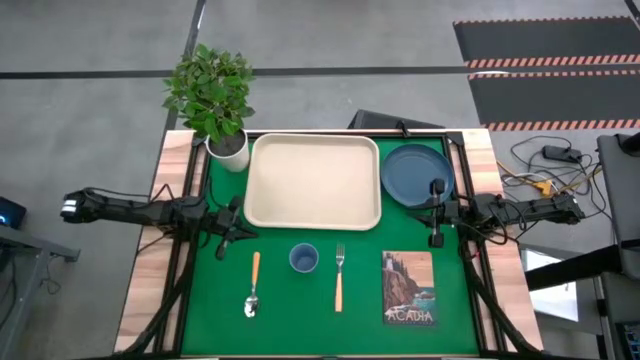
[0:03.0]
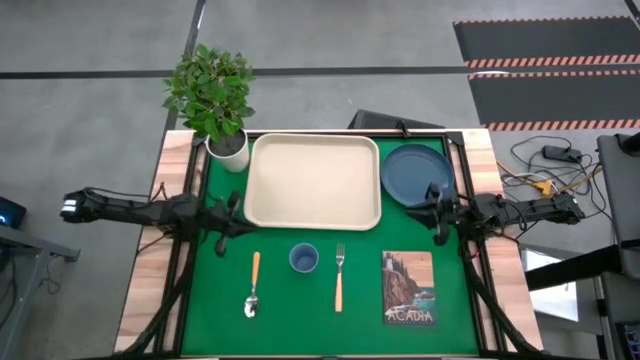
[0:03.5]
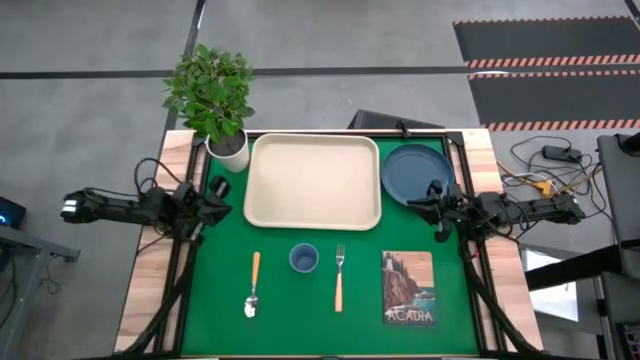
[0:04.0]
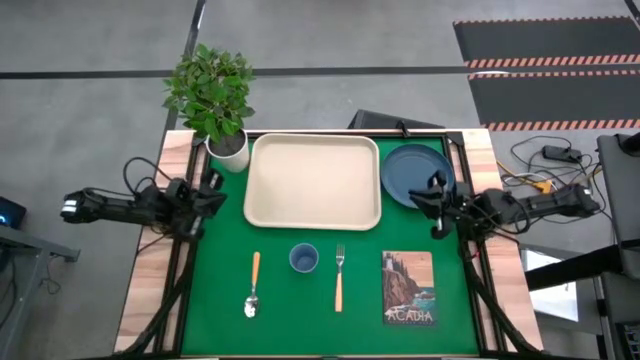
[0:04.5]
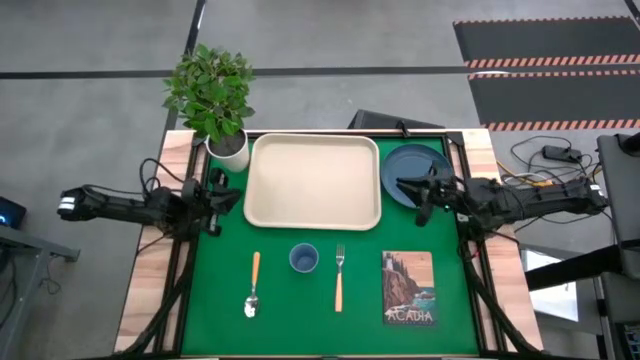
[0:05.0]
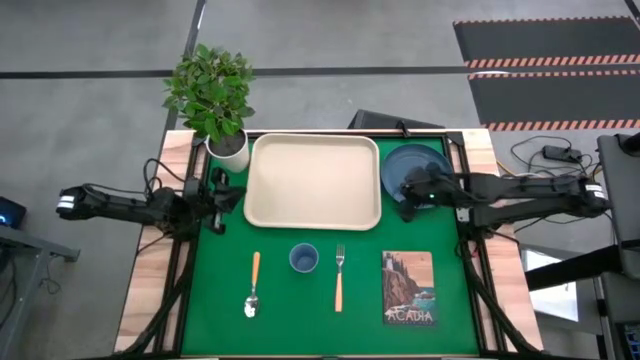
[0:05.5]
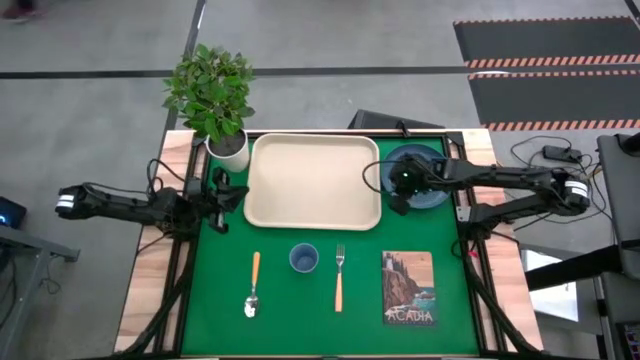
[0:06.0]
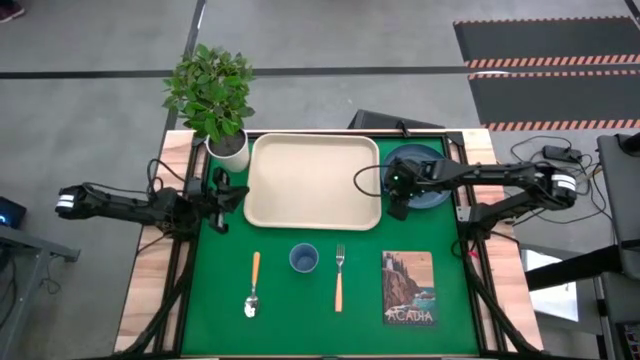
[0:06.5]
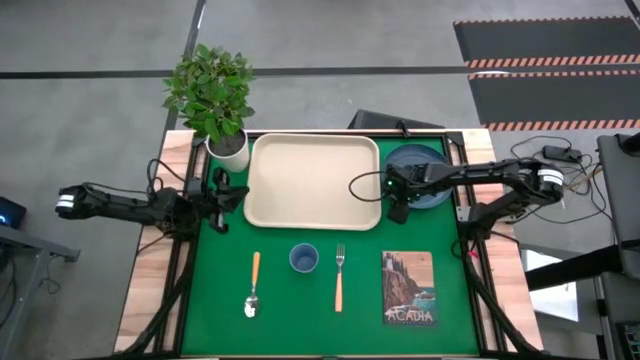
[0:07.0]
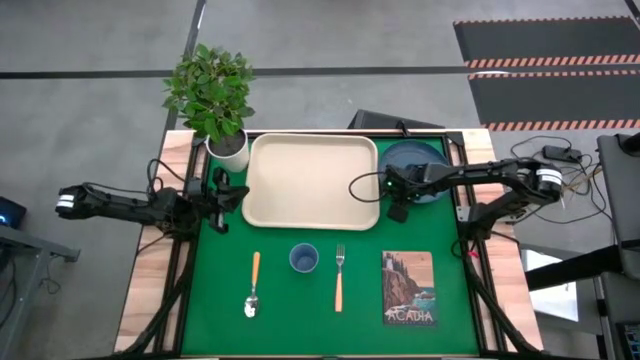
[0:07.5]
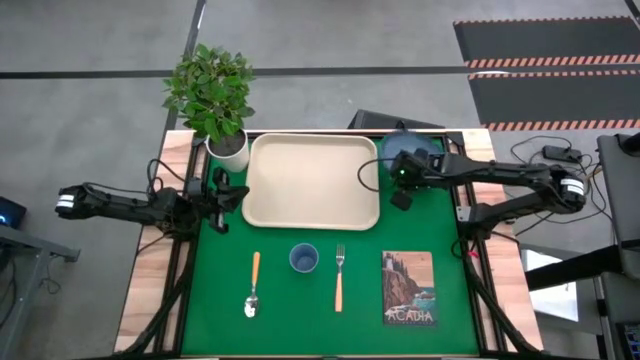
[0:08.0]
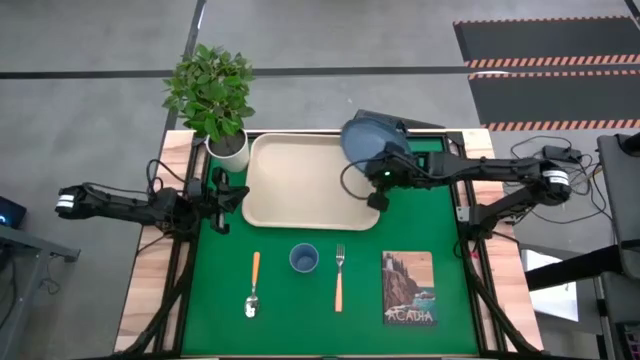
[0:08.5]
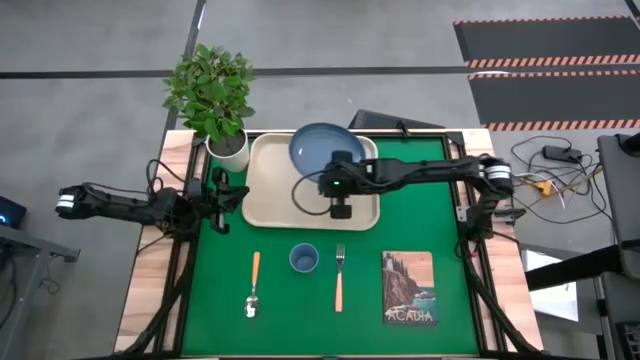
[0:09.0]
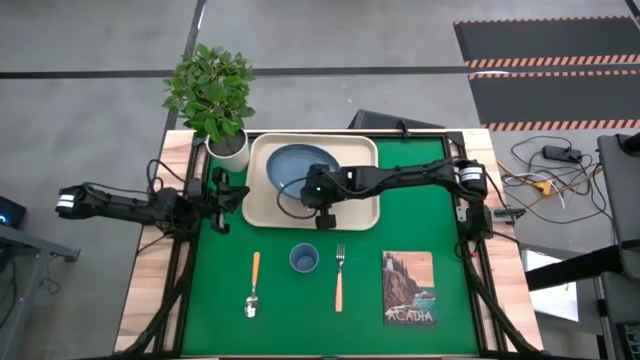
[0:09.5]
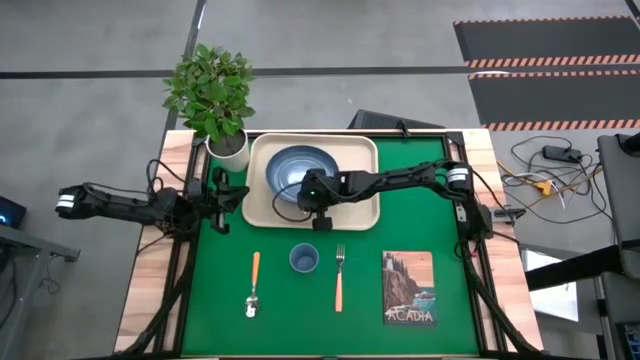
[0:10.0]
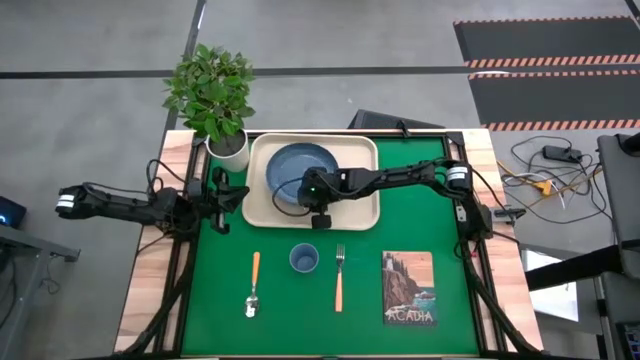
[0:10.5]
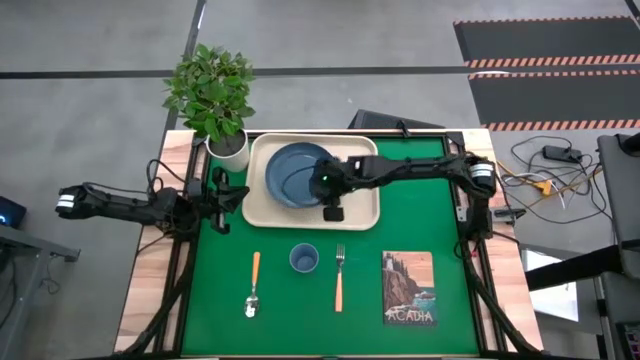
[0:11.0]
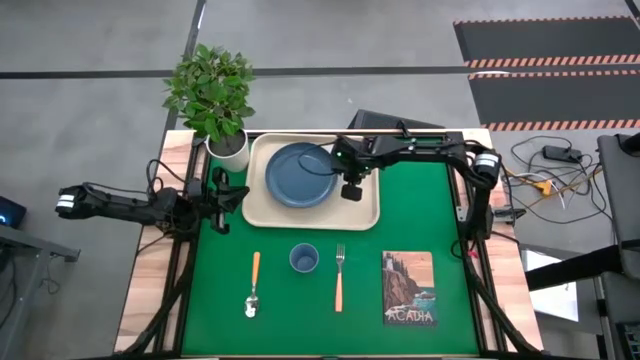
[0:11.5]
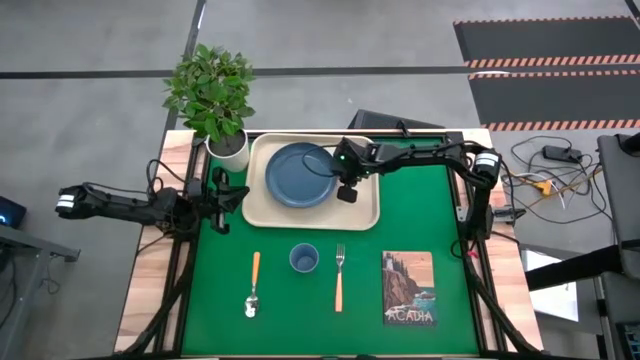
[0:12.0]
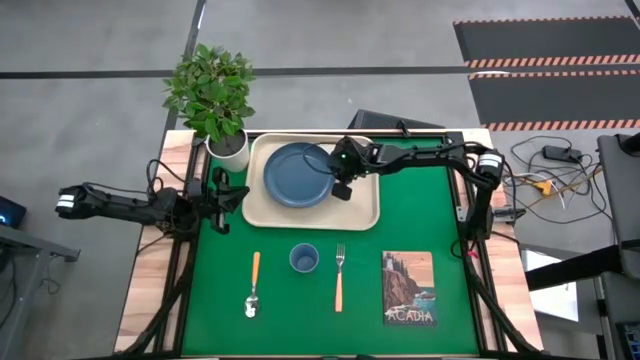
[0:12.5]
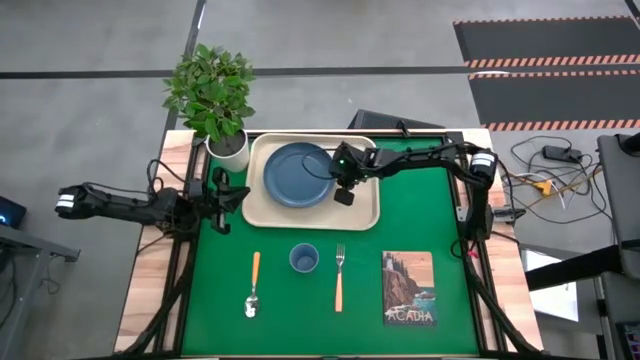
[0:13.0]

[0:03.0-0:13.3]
Task: Pick and place plate/cup/fork/spoon on tray
Put the blue plate on the white serving tray

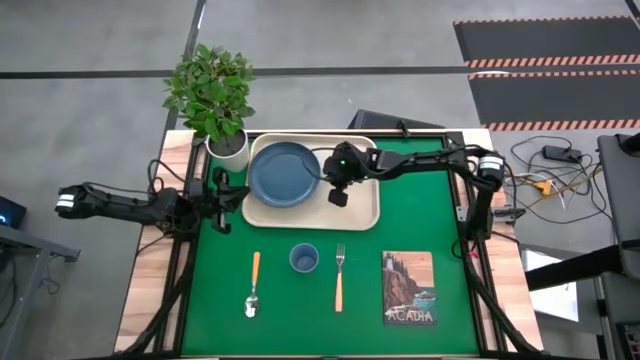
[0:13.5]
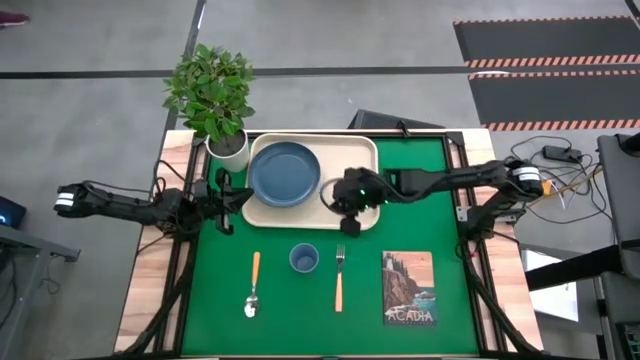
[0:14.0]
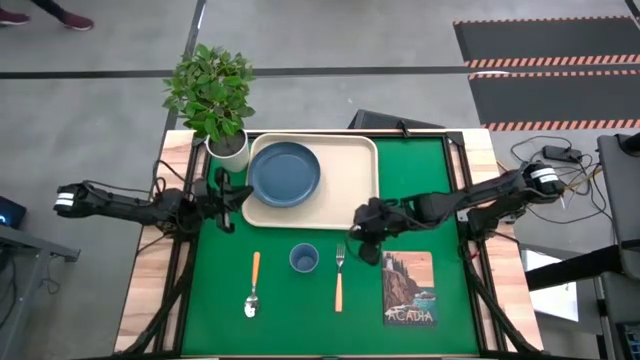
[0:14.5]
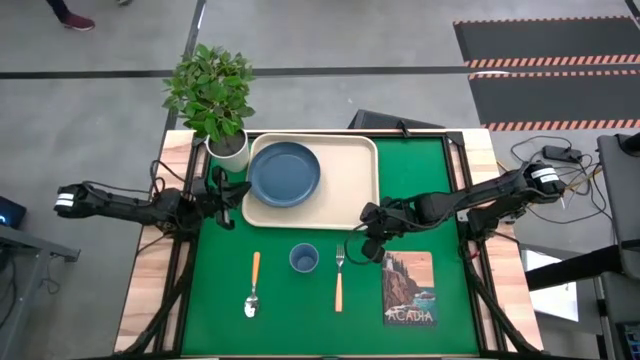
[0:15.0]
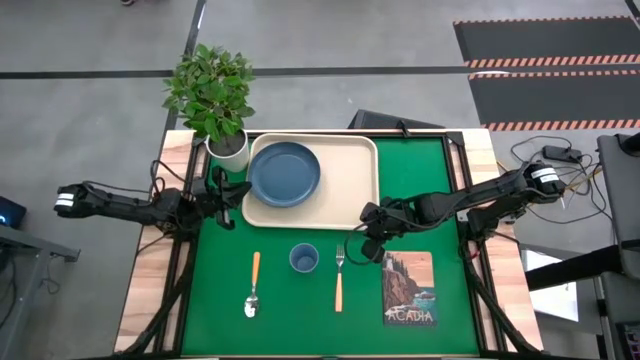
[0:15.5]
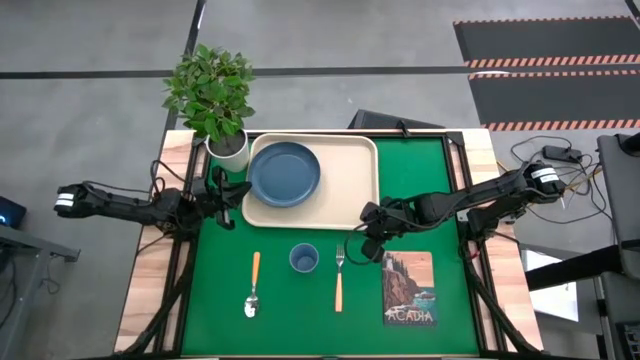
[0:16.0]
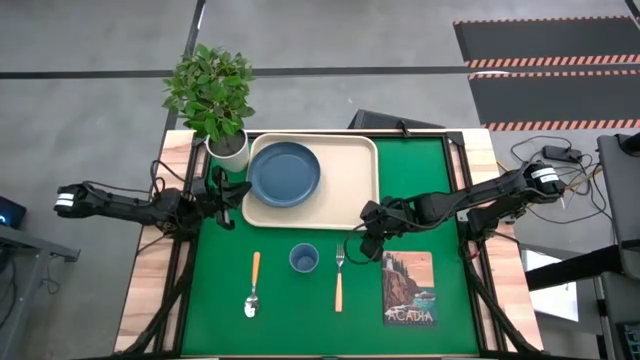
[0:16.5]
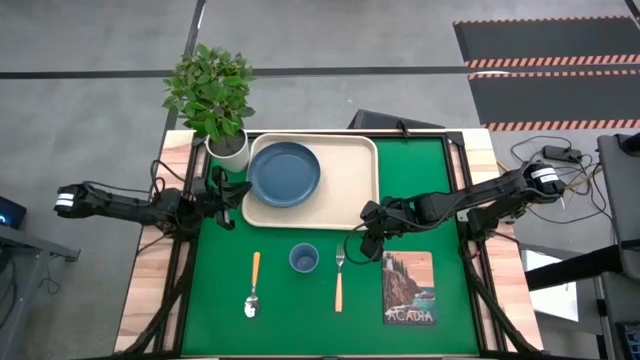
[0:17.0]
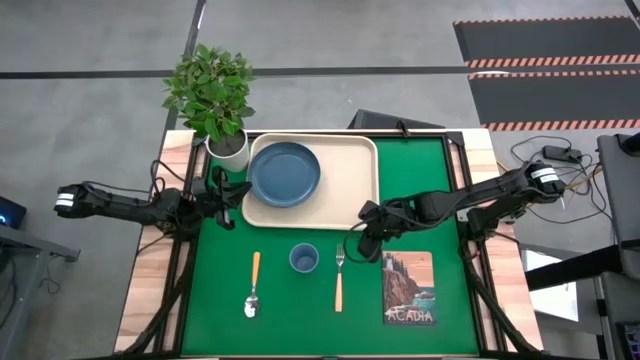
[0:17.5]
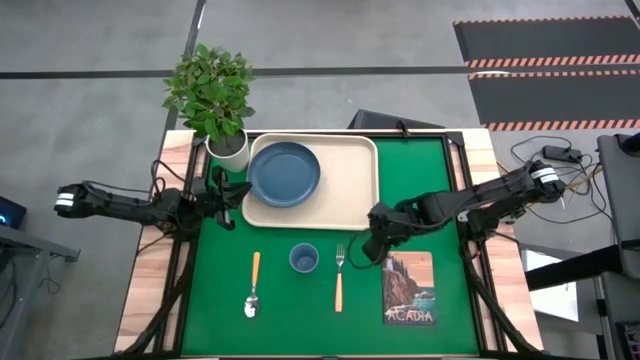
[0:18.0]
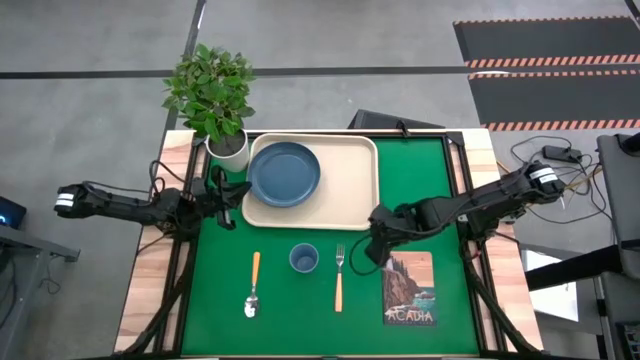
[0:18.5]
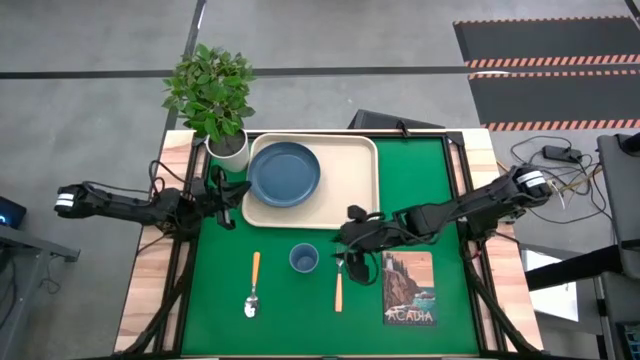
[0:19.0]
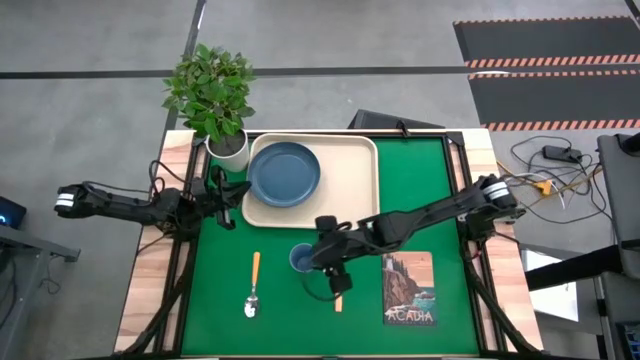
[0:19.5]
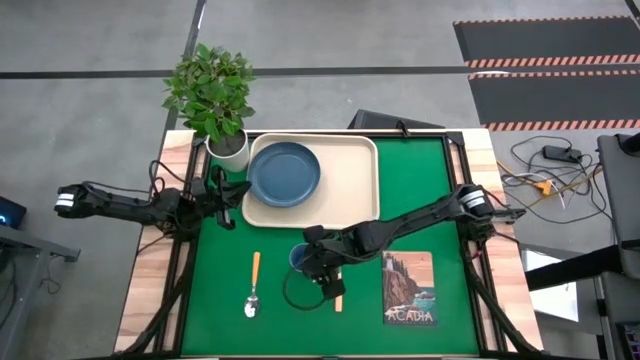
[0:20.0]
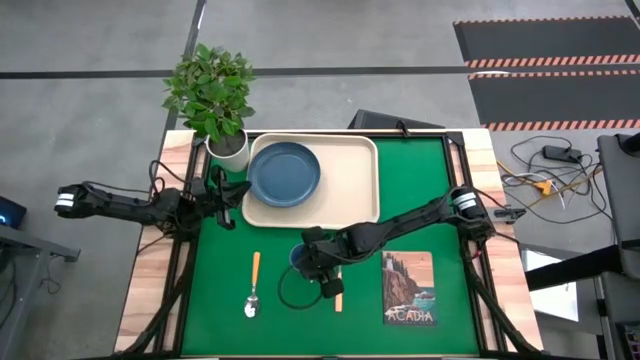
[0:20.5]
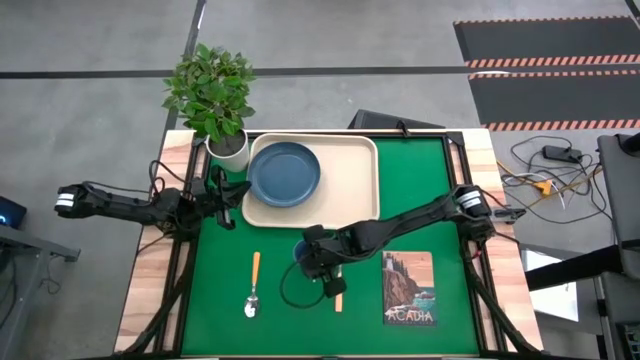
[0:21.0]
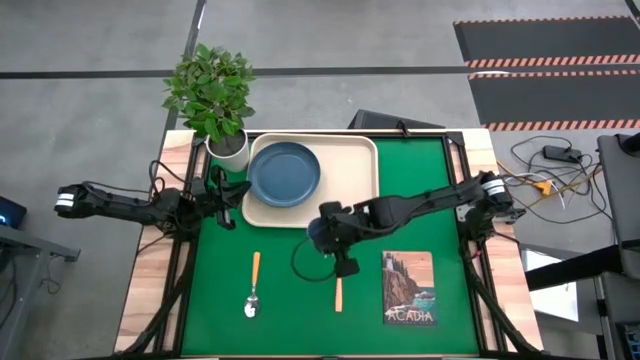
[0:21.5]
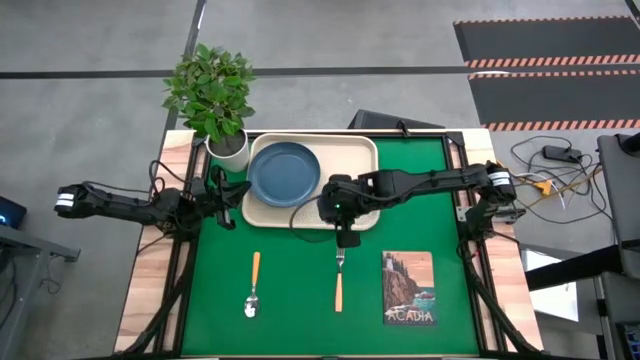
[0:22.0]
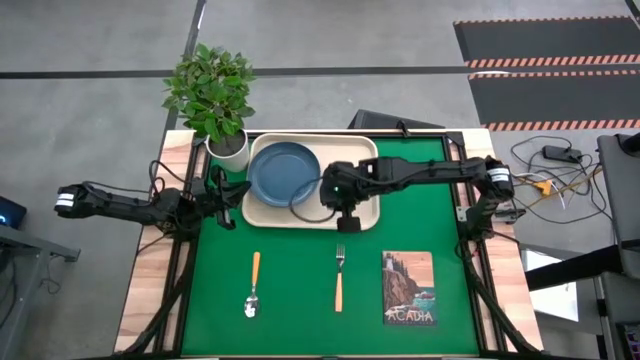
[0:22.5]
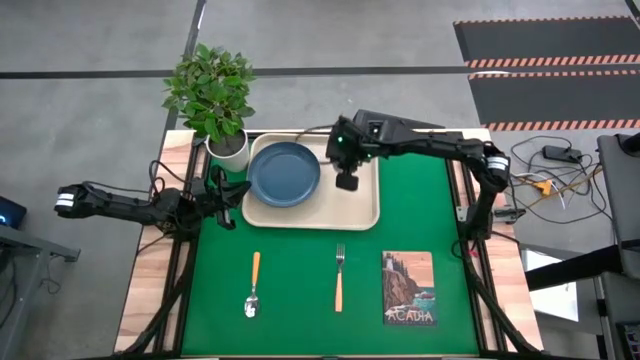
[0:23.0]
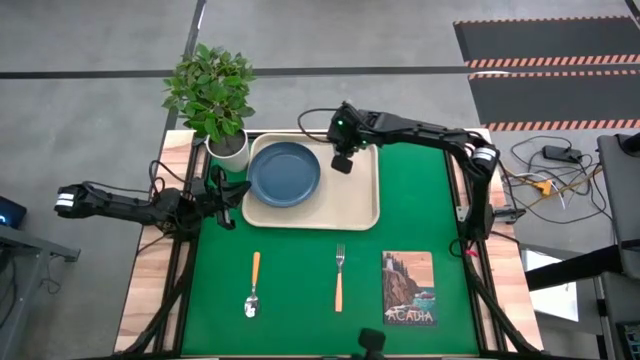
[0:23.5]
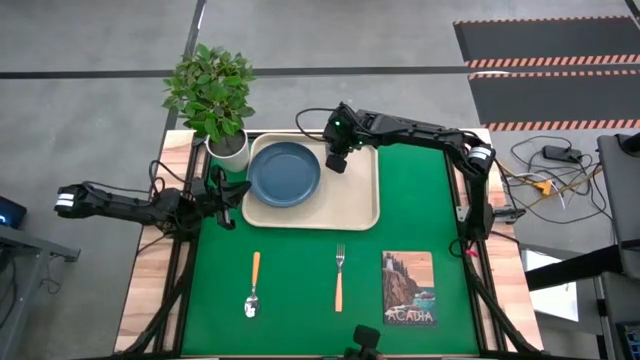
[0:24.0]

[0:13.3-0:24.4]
Put the blue cup on the white serving tray at the top right of the blue plate
